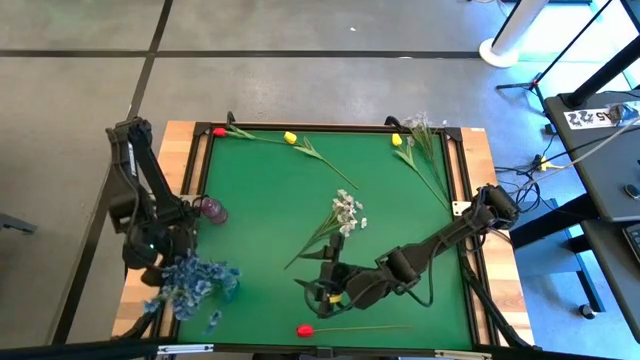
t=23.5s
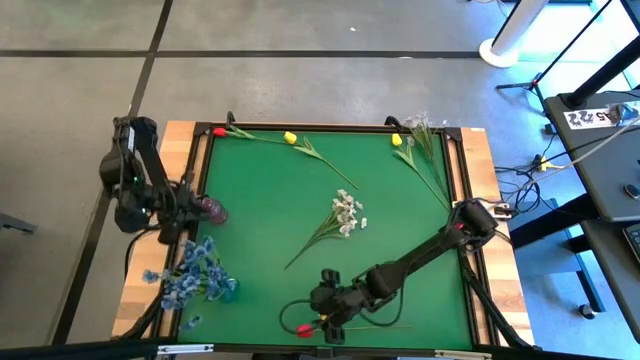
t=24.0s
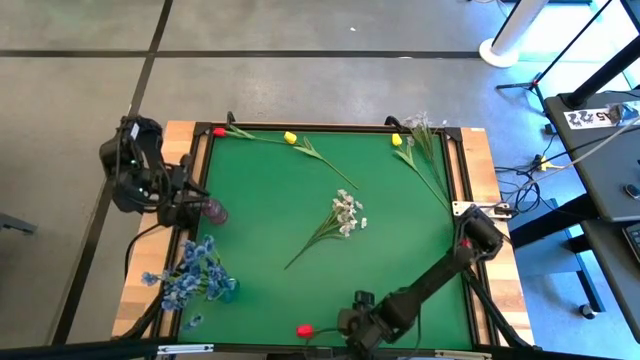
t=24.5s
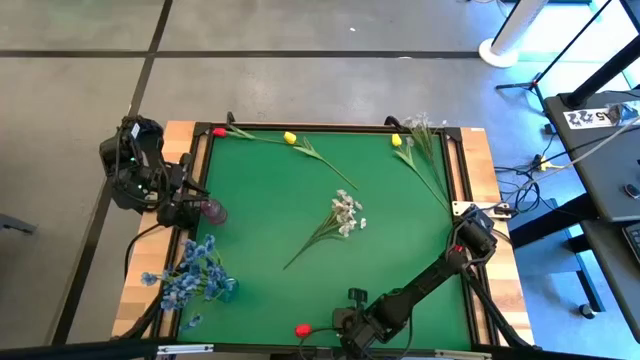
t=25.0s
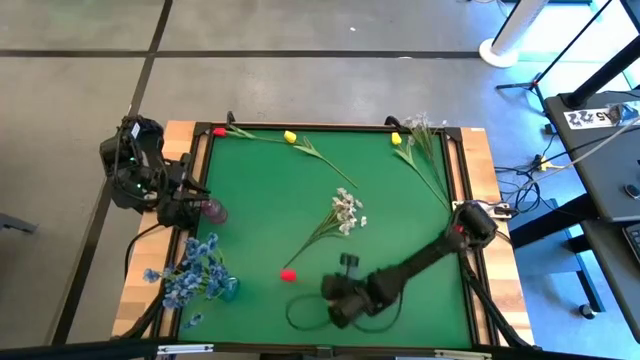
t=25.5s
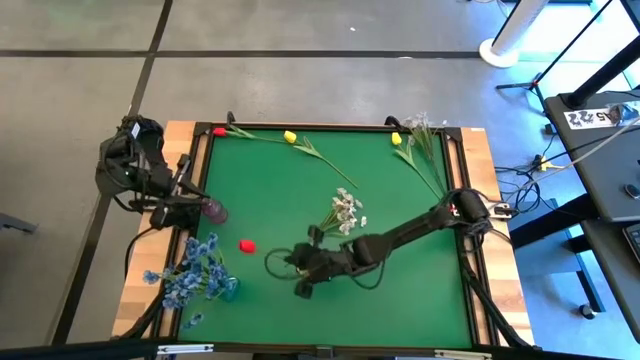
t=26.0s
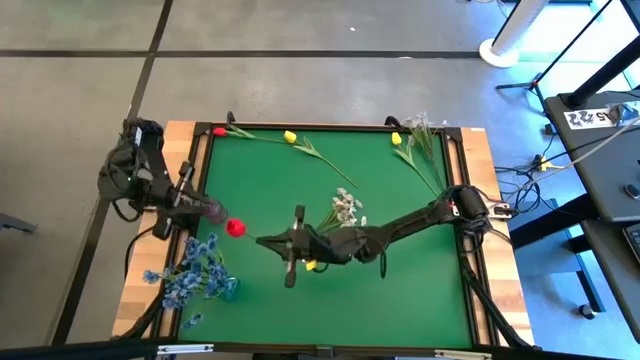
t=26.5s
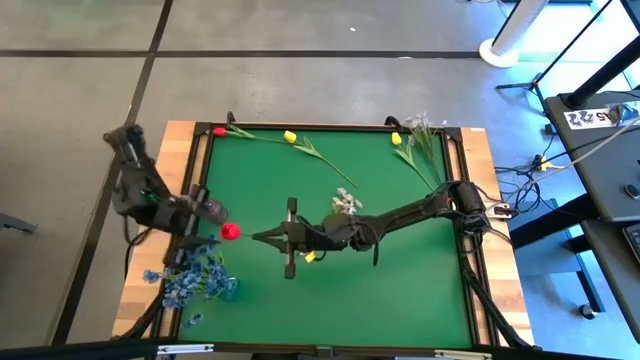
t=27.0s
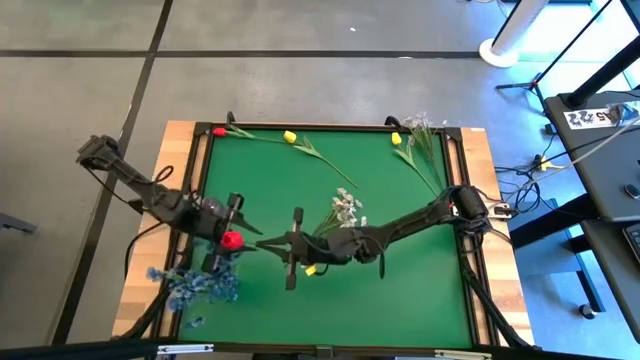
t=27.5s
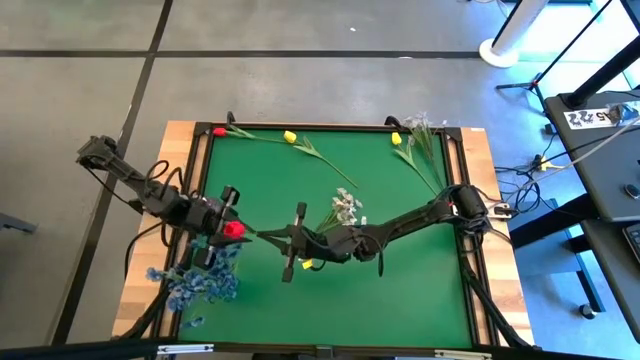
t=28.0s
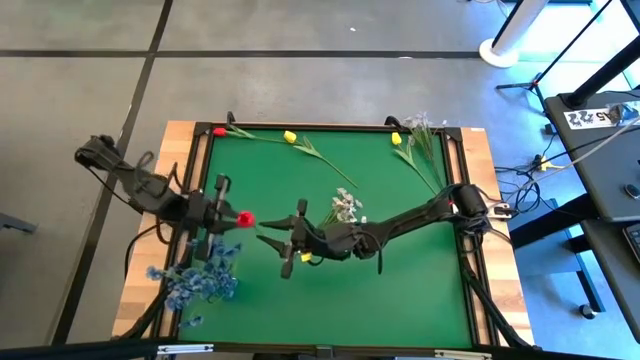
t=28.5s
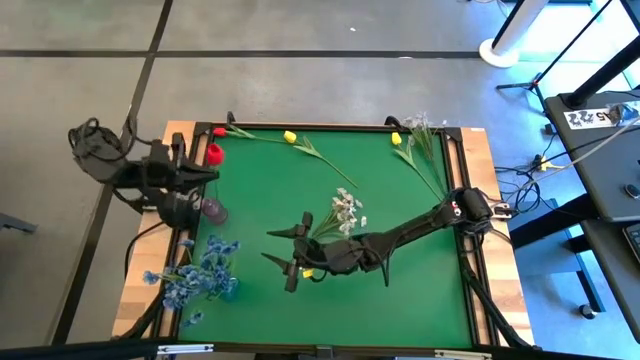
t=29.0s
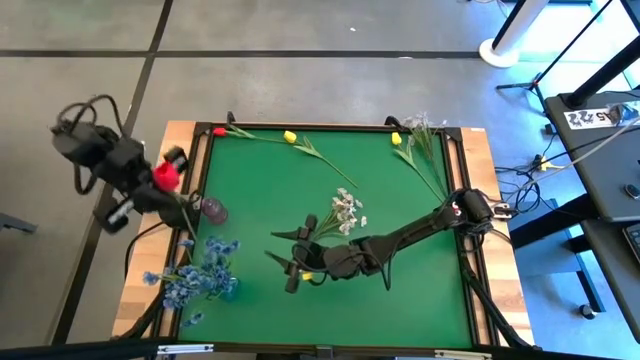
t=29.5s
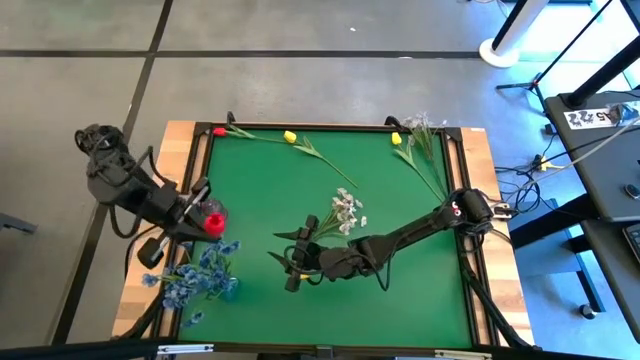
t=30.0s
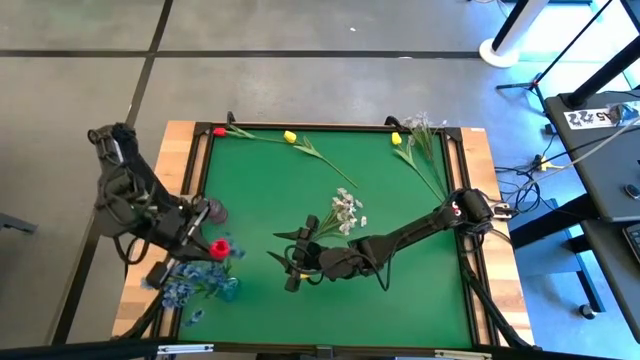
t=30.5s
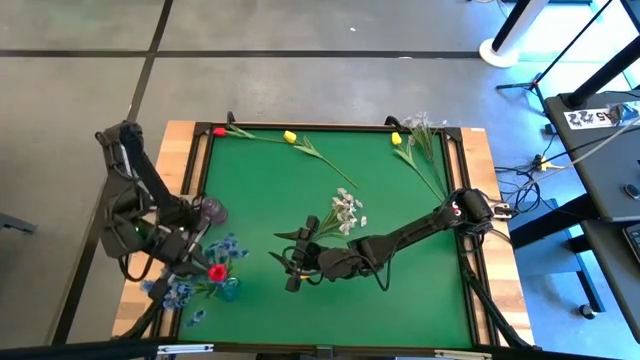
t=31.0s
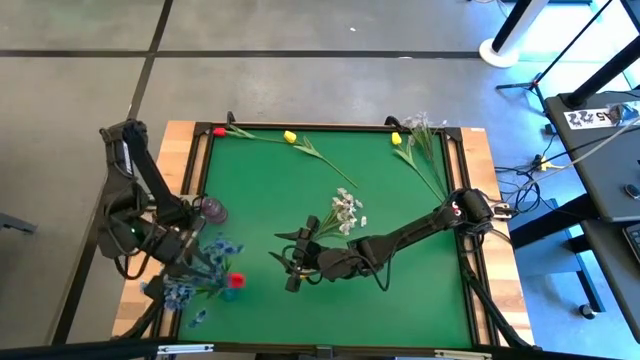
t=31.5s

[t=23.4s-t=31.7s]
Task: Sort flowers into vase by color
Put the bottom red tulip into the blue vase

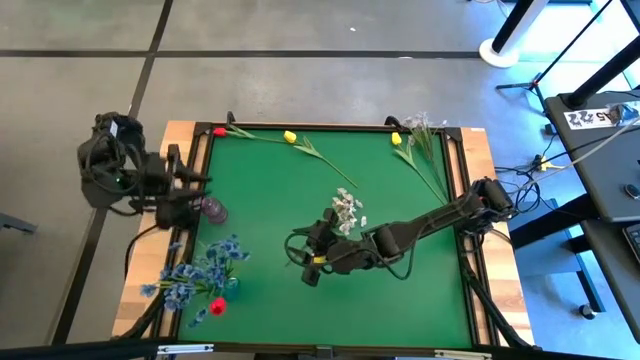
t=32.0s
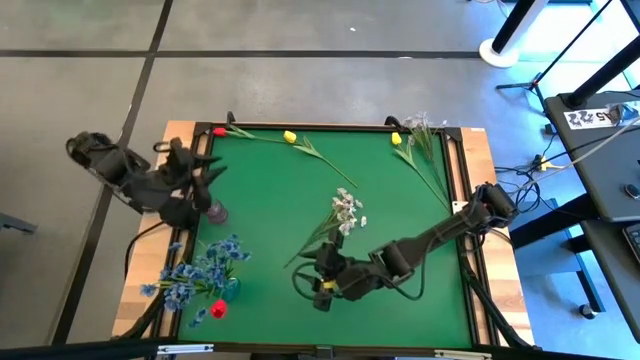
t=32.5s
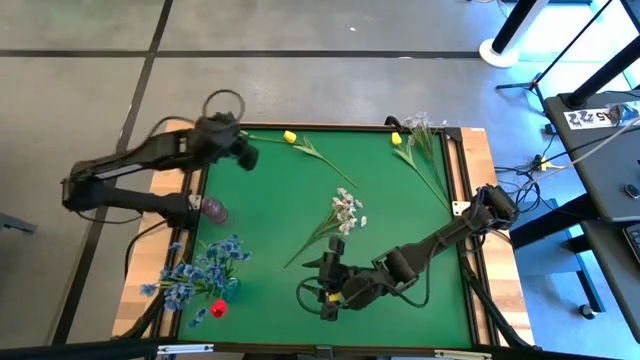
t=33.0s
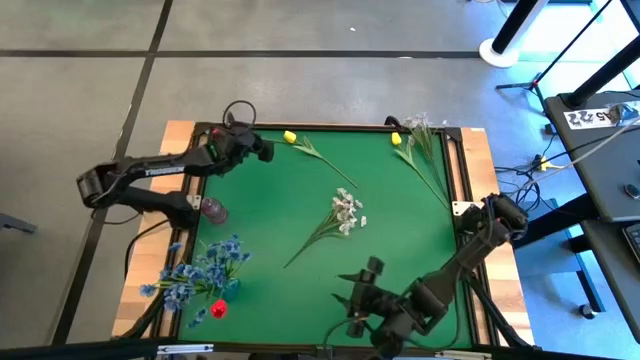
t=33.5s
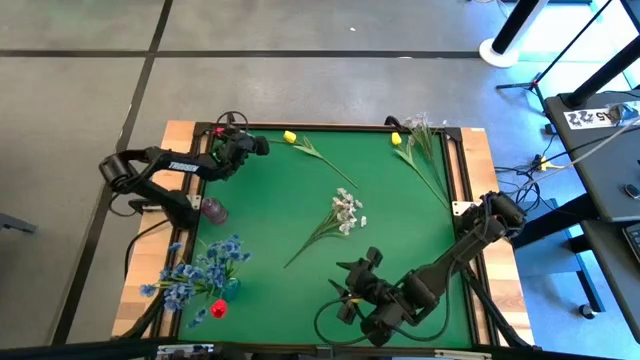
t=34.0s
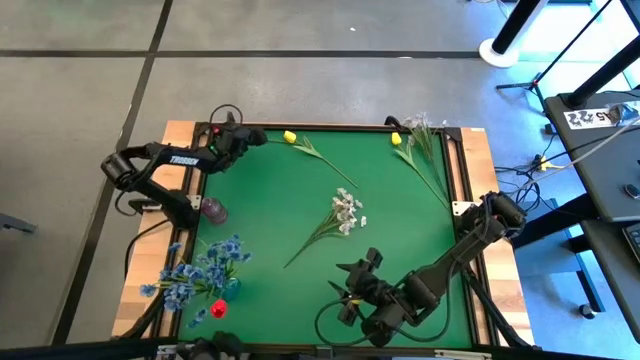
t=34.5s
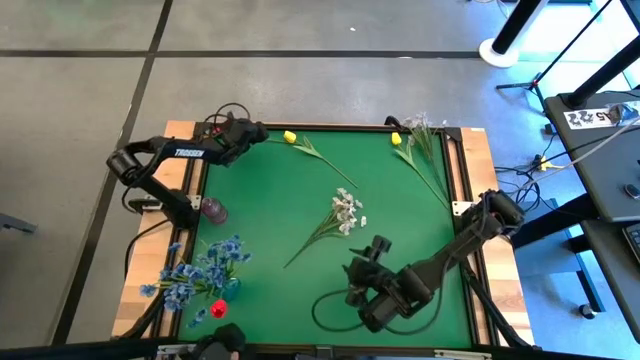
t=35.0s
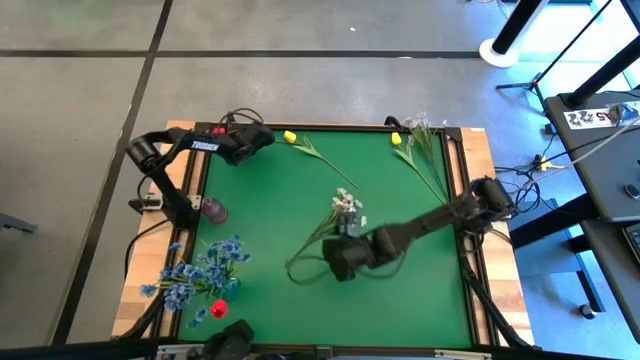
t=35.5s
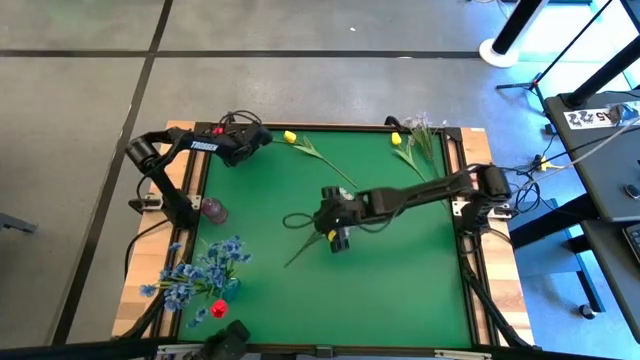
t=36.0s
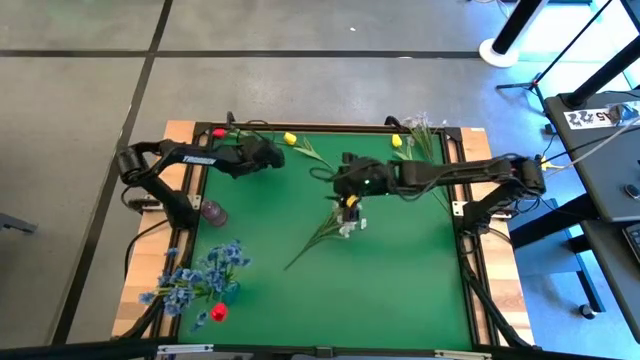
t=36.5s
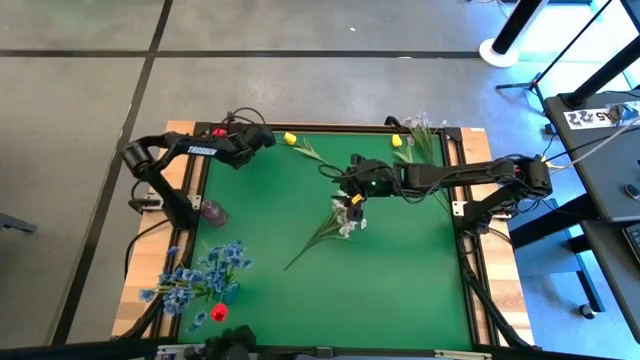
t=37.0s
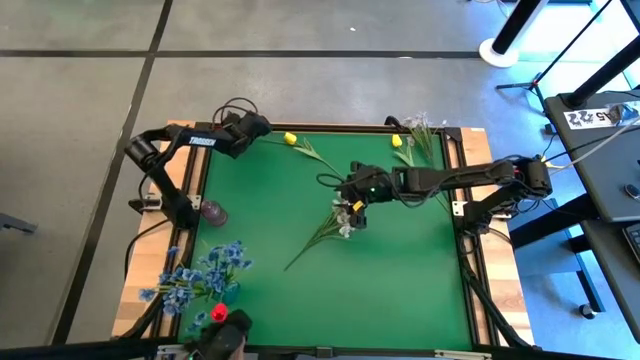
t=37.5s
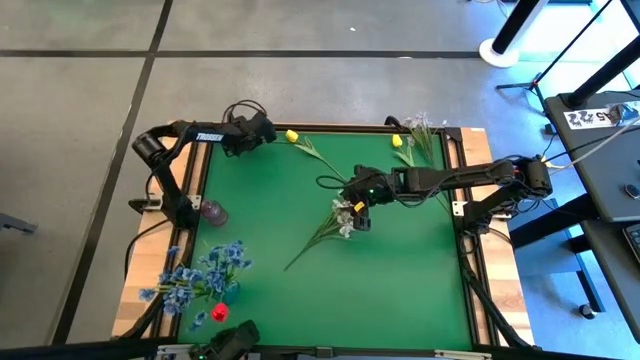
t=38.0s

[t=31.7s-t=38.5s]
Put the red tulip into the blue vase

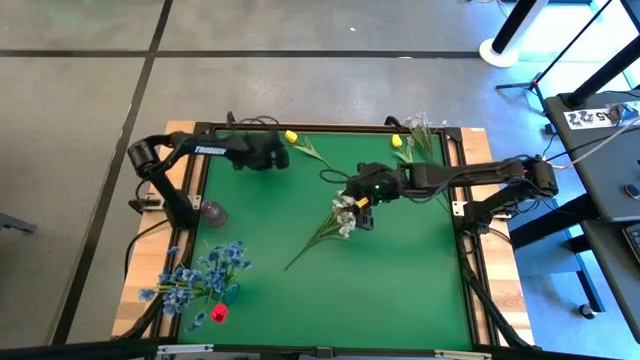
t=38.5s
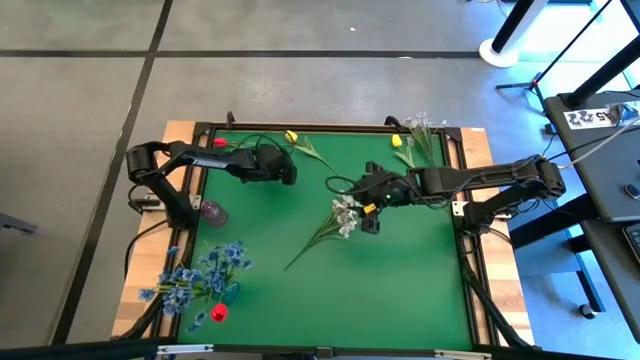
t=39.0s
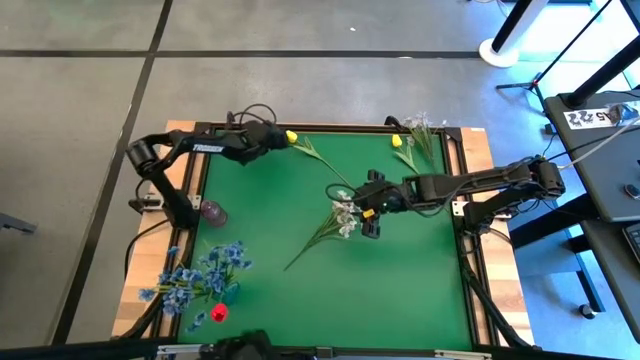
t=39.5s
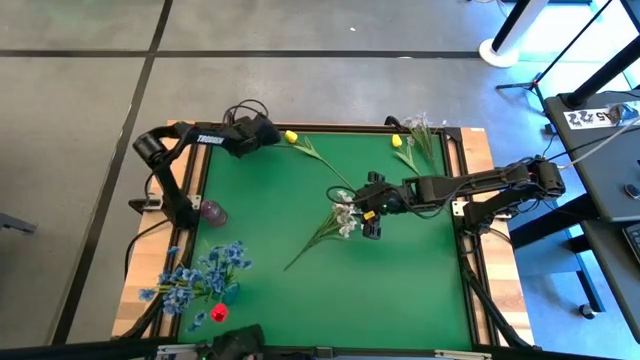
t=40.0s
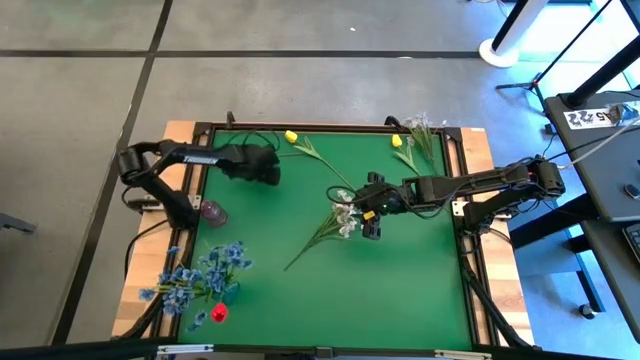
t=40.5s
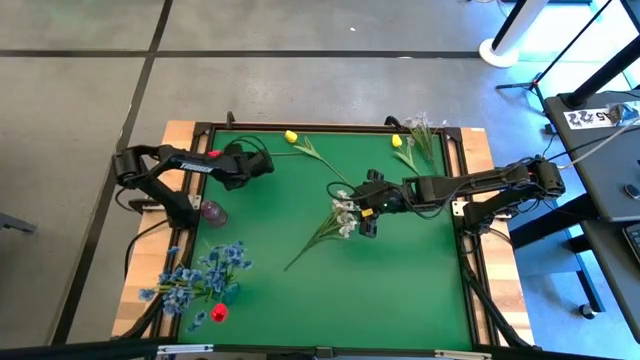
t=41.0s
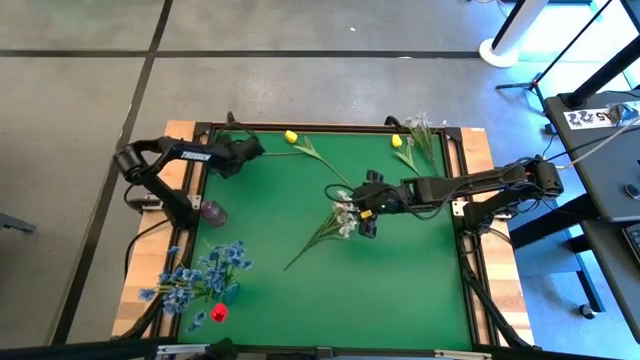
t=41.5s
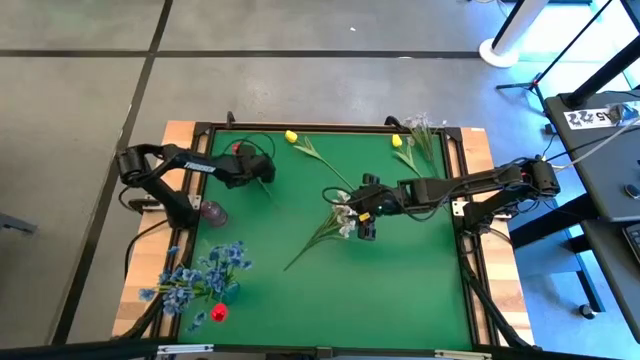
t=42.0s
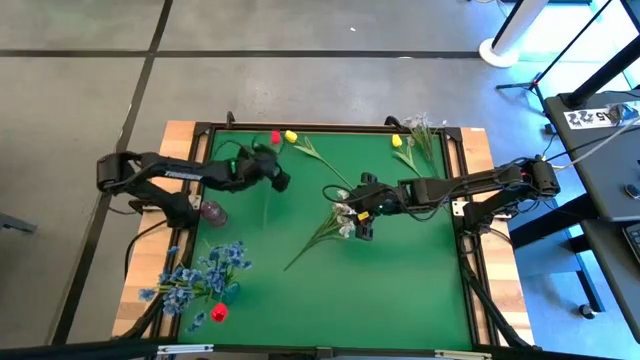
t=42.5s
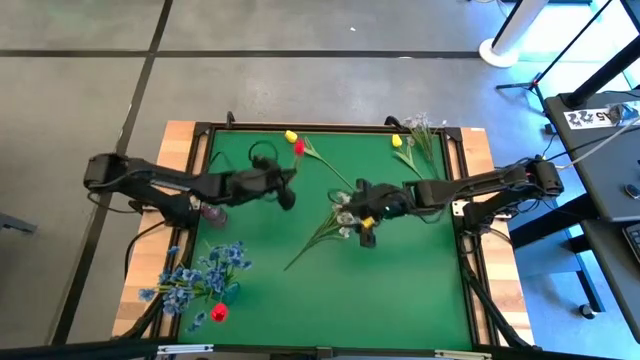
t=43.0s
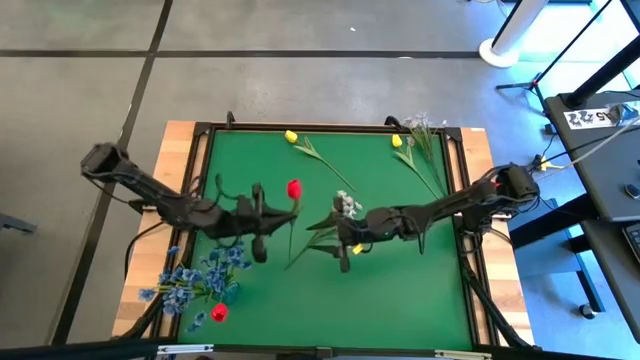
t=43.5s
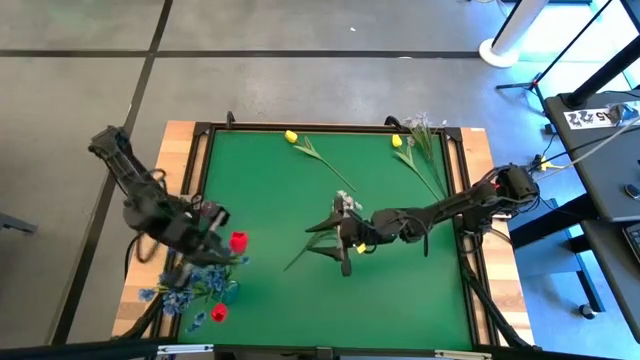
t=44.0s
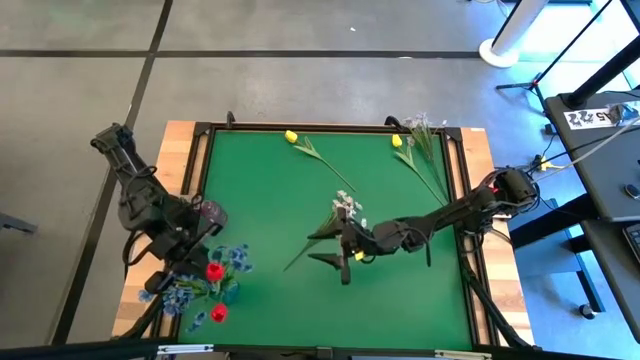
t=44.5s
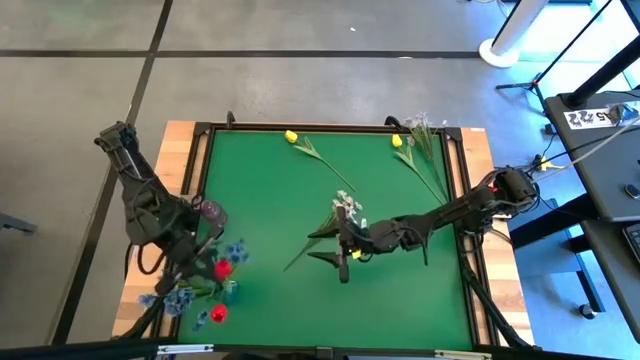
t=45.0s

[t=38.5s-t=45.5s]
Put the red tulip into the blue vase
